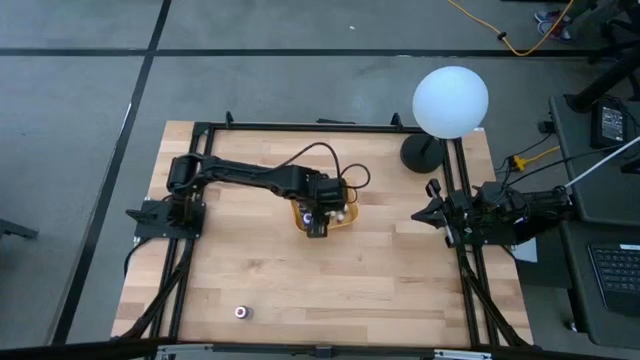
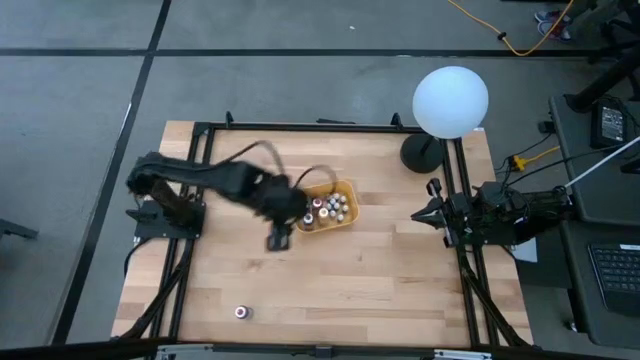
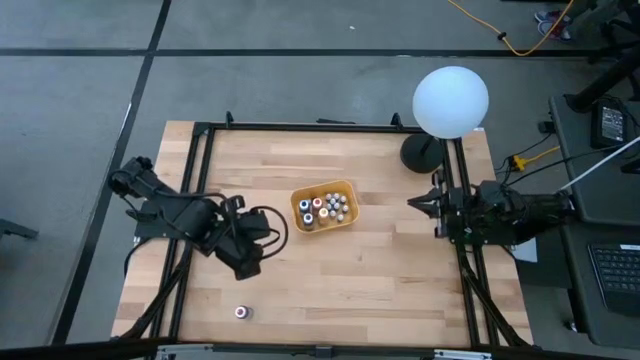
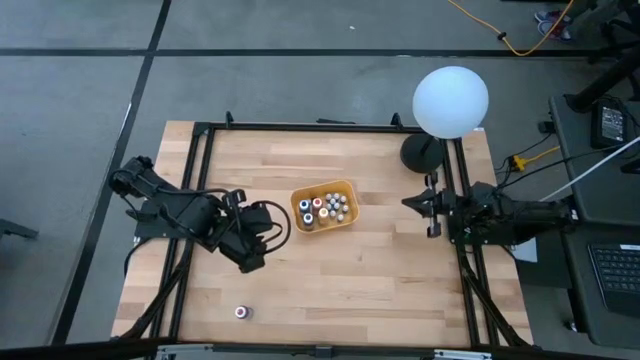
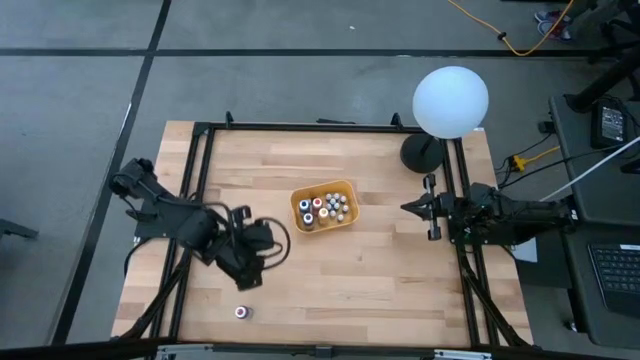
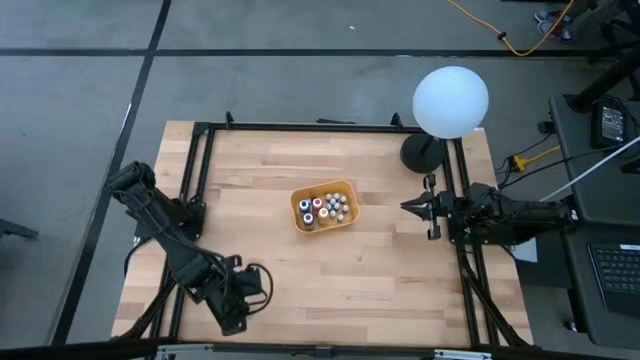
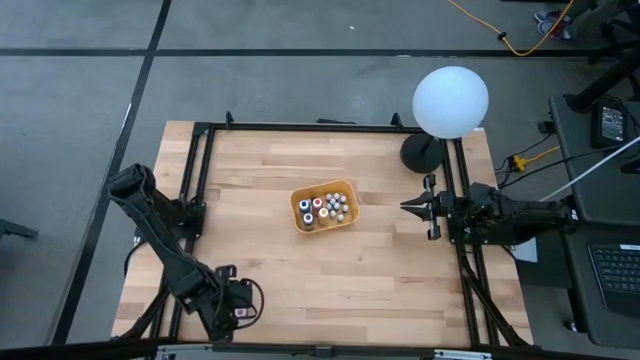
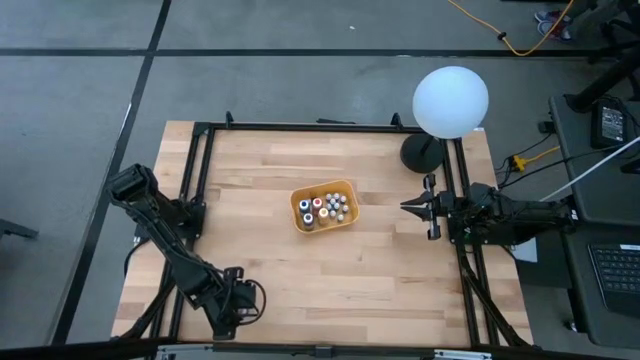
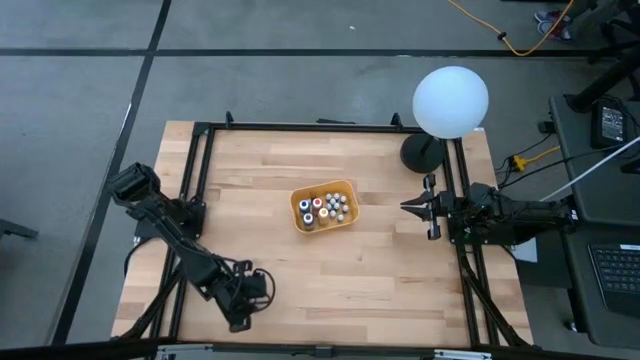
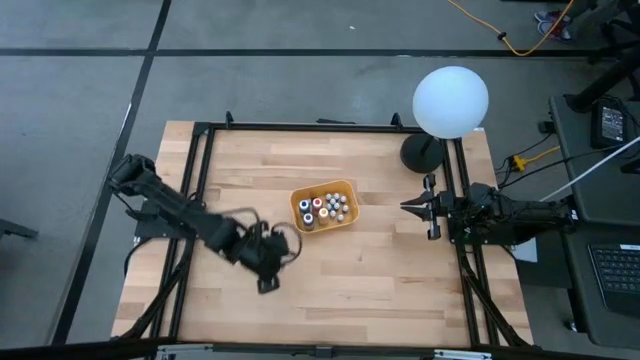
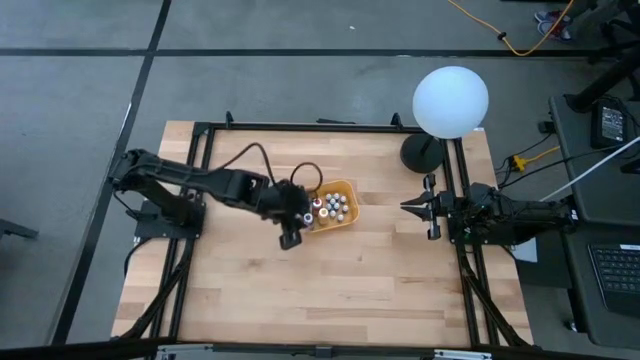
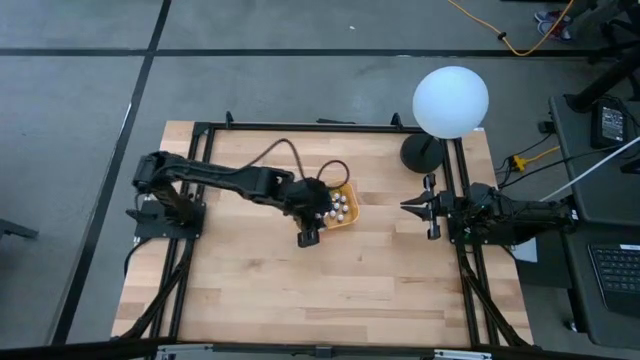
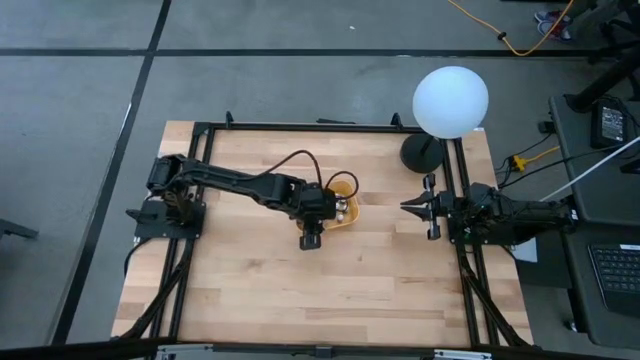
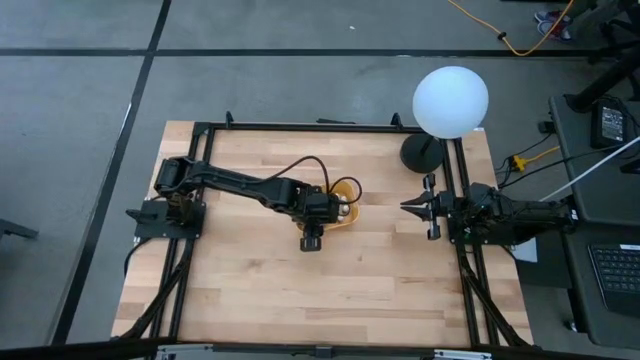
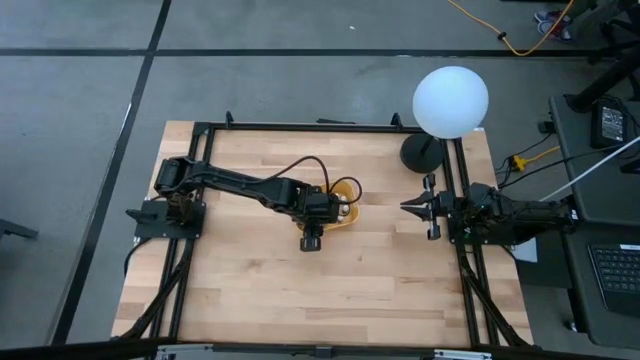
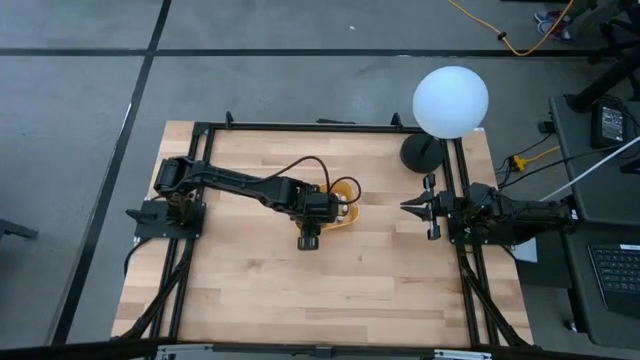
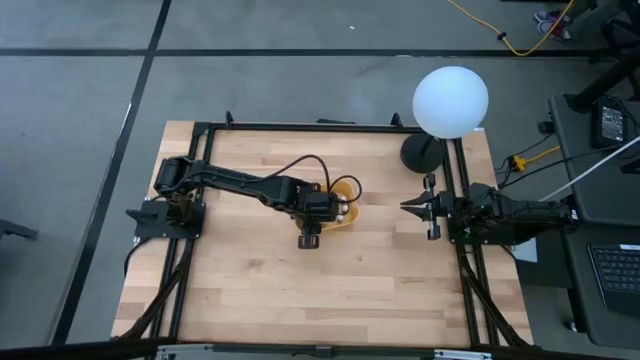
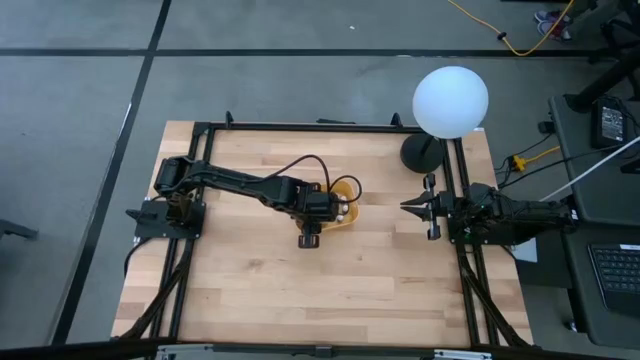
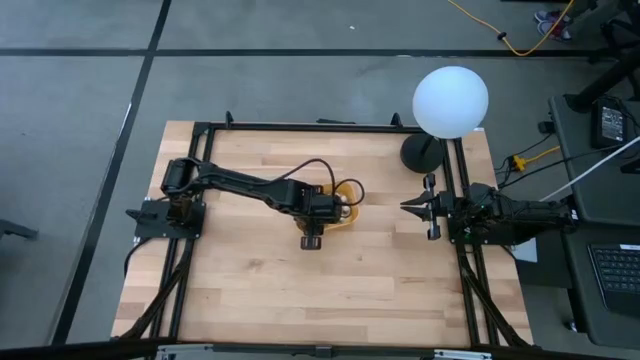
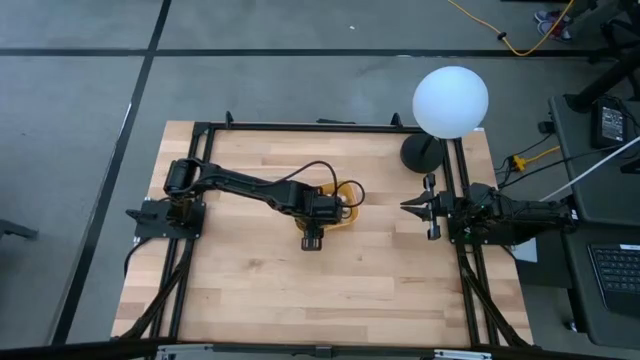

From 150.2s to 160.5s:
Task: Pick & Place food coloring
Put the pink food coloring bottle into the yellow bin

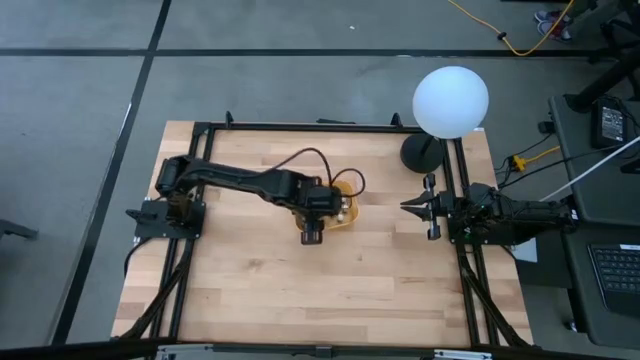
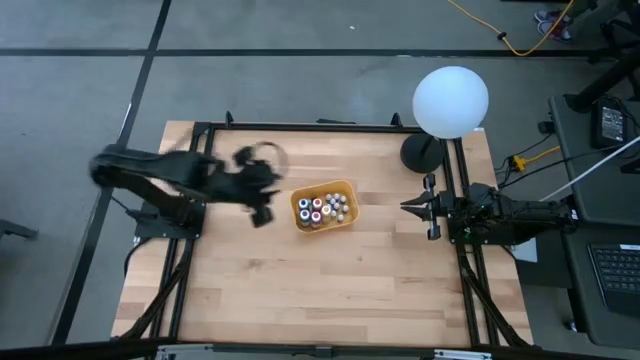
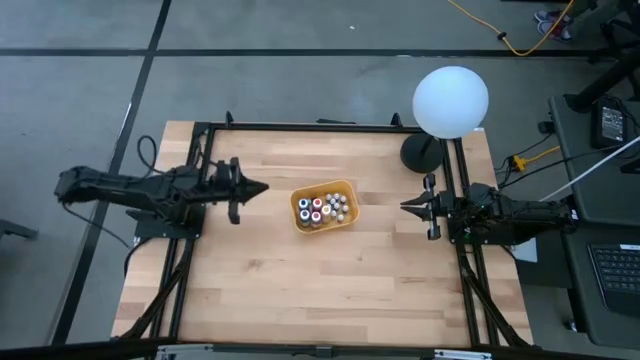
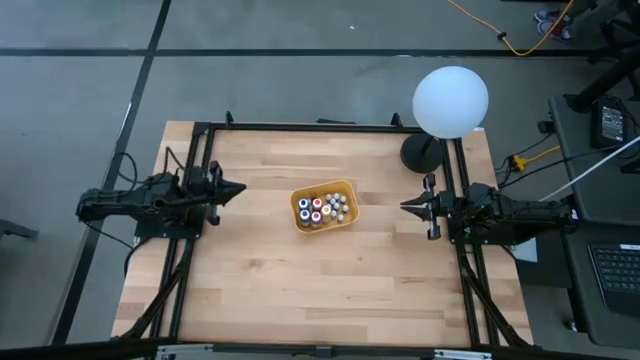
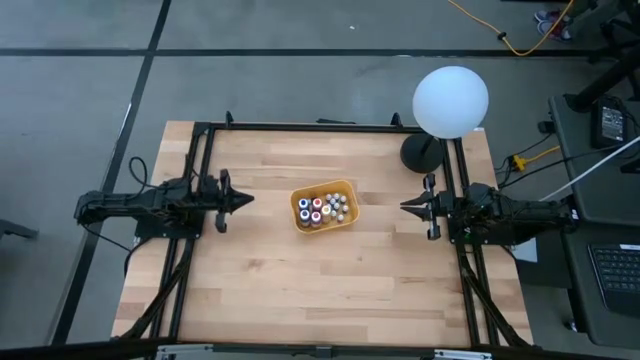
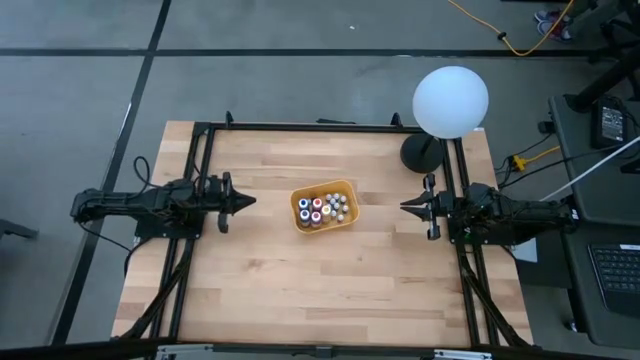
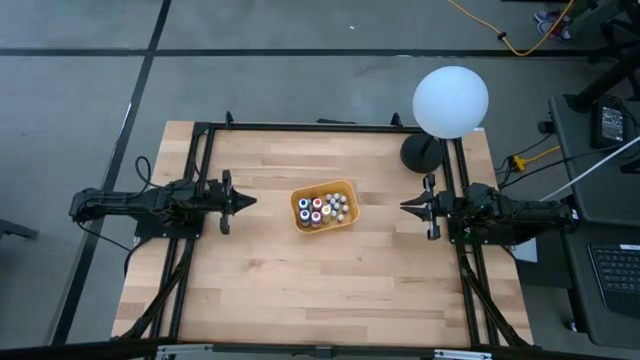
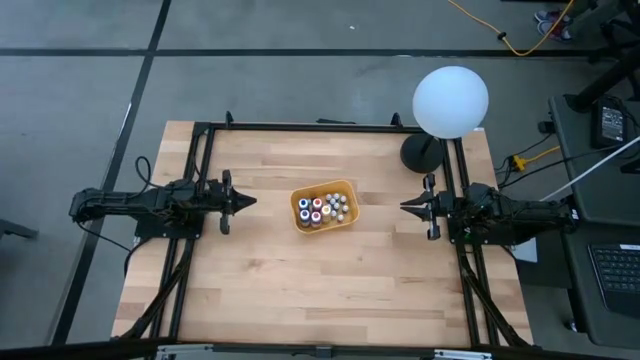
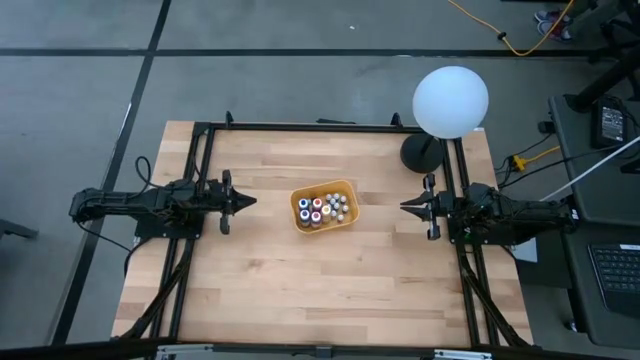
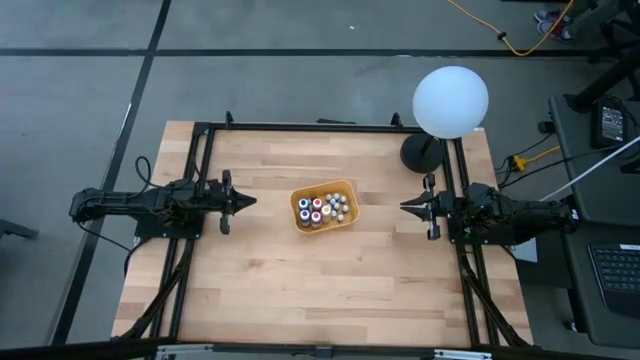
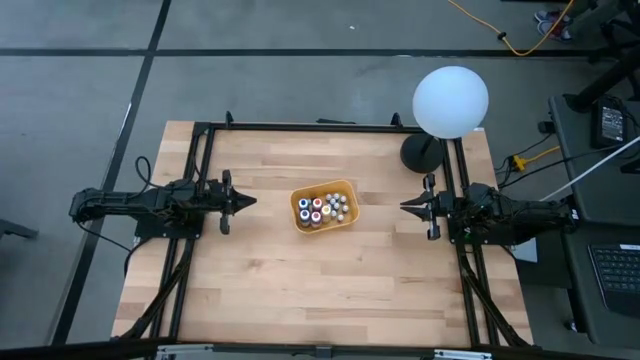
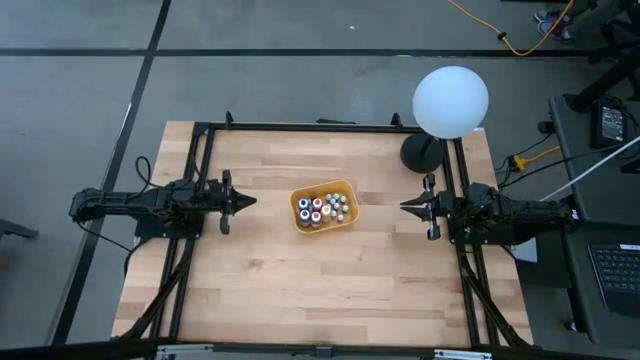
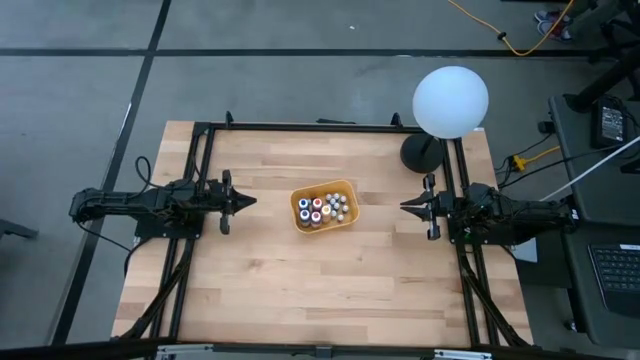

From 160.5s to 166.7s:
Return to Home Position

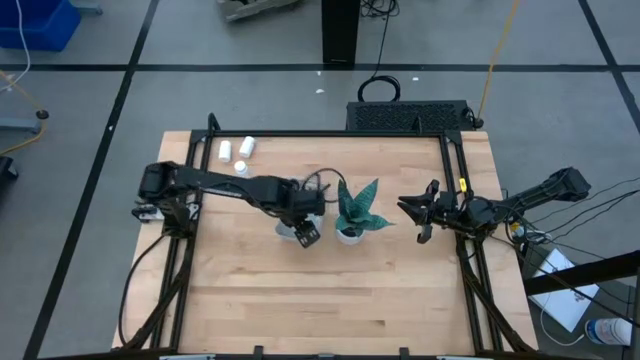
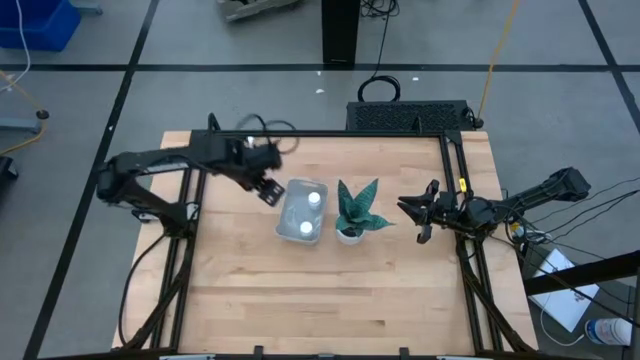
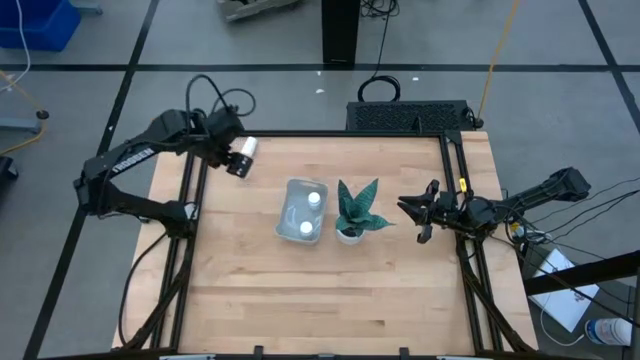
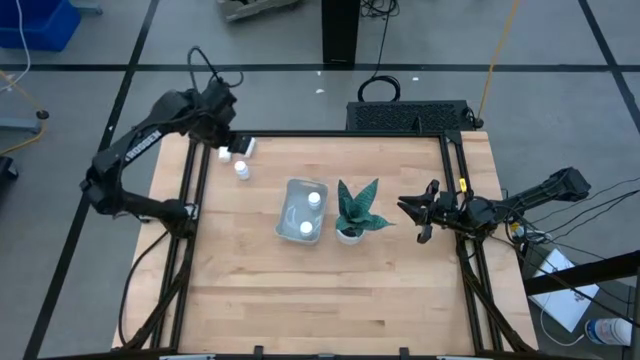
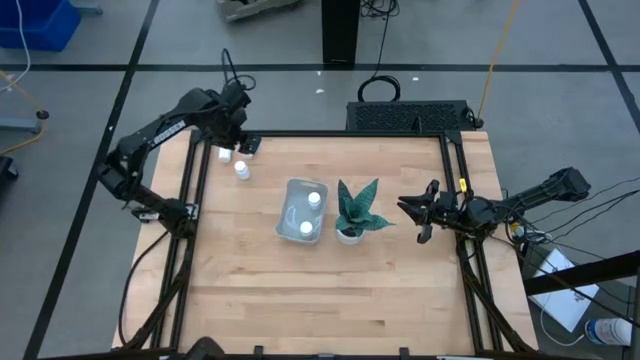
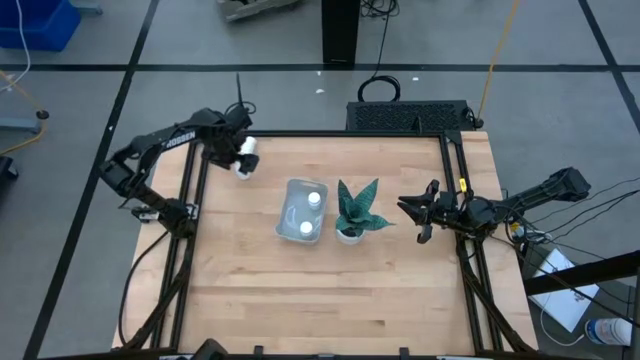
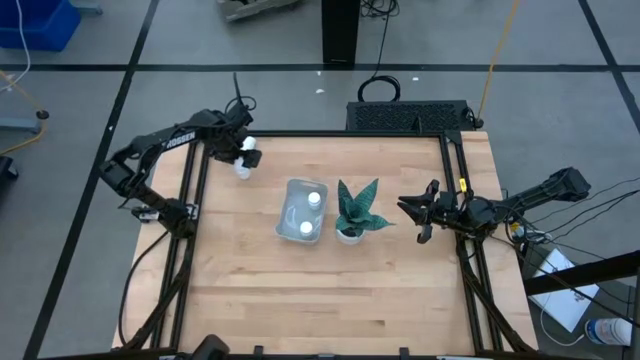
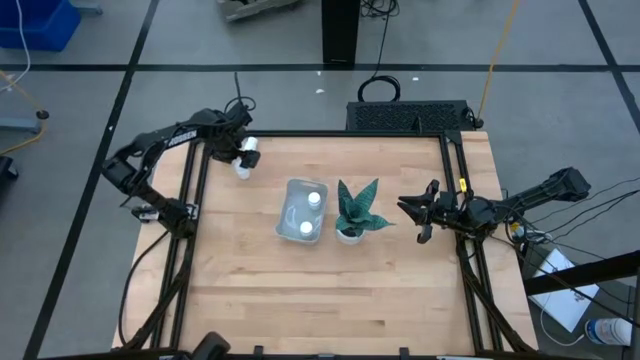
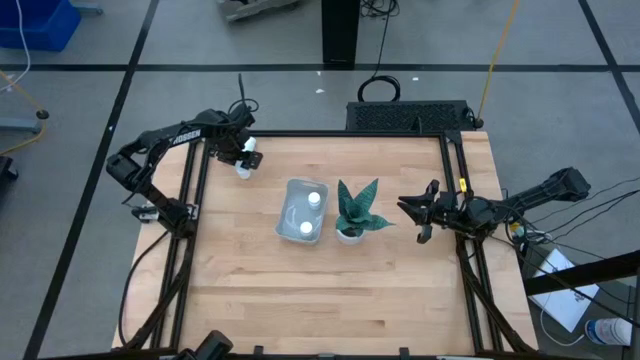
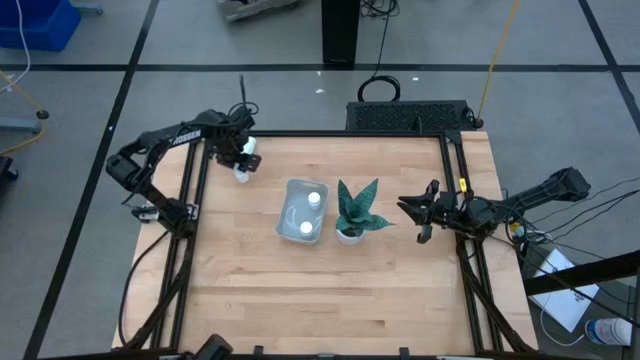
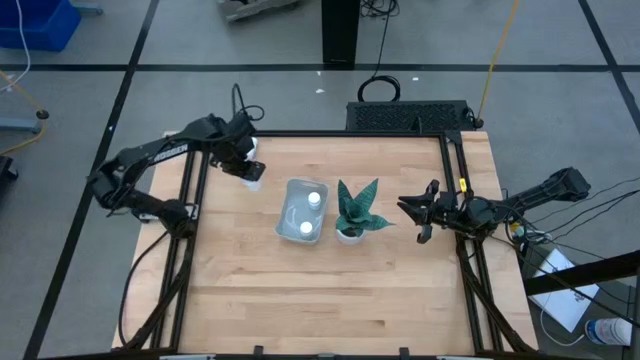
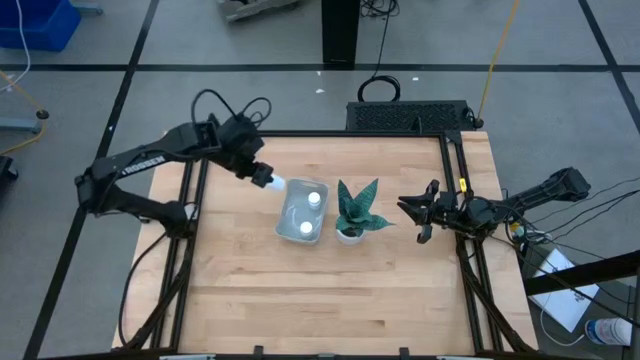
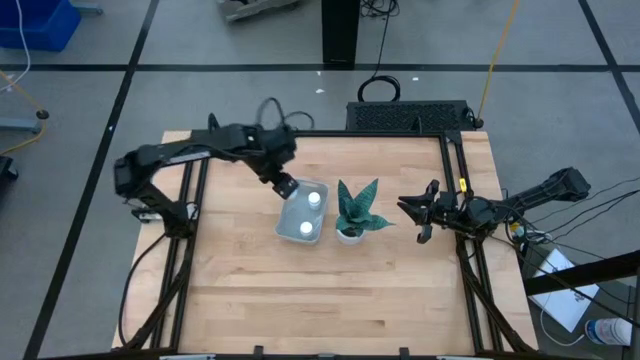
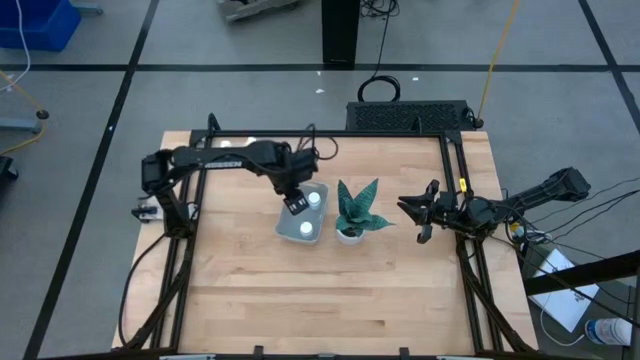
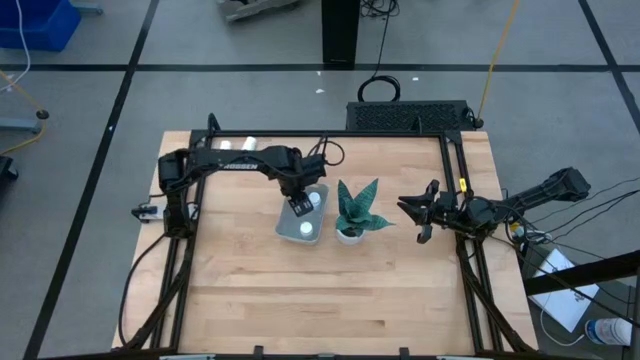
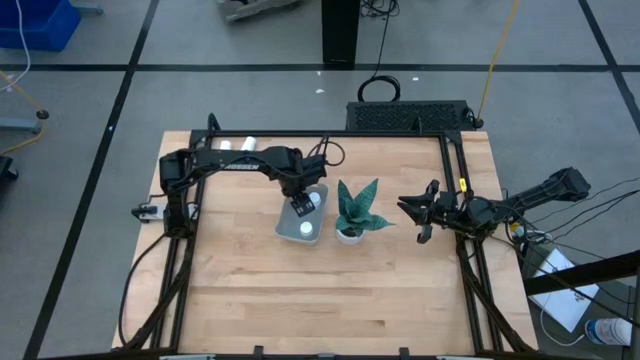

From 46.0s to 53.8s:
Task: Pick and place pill bottles into a basket
Put the white pill bottle into the gray bin
